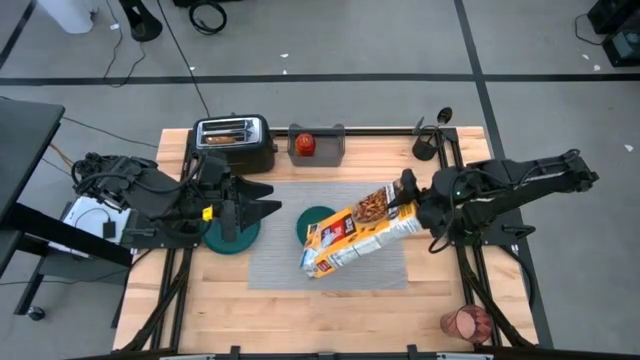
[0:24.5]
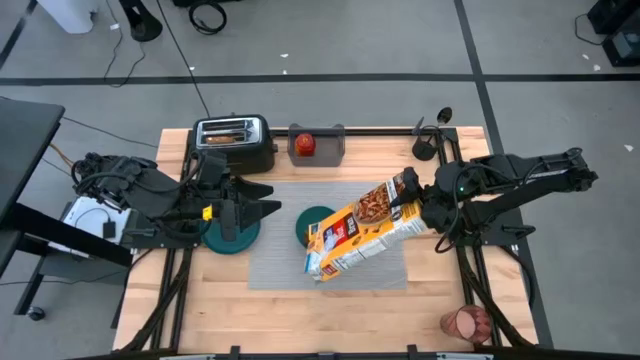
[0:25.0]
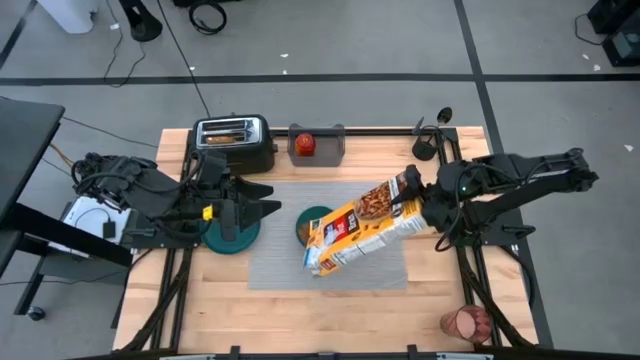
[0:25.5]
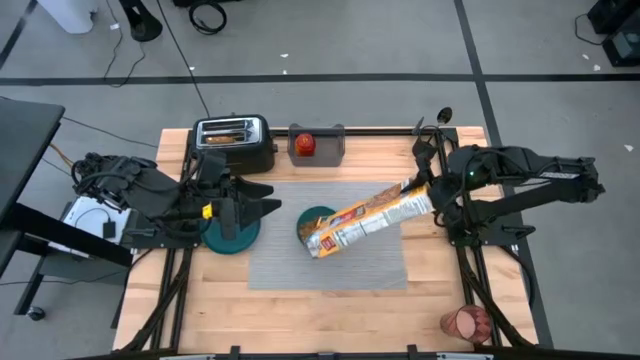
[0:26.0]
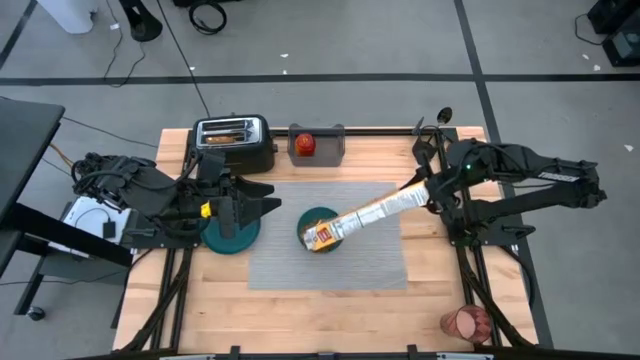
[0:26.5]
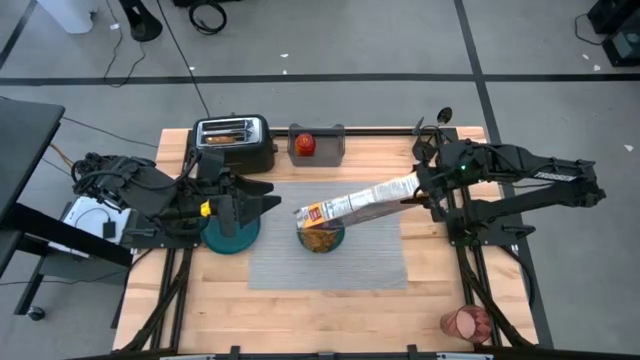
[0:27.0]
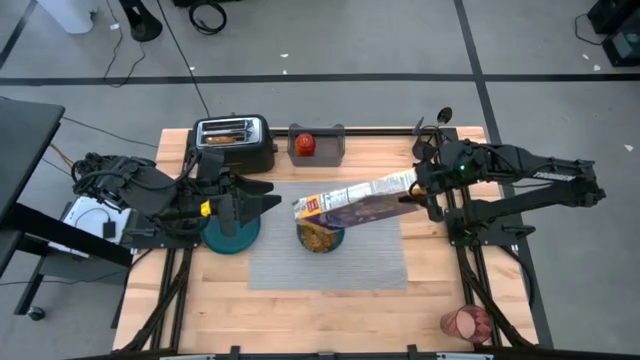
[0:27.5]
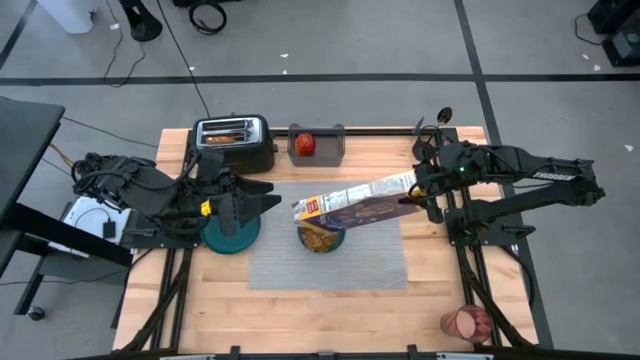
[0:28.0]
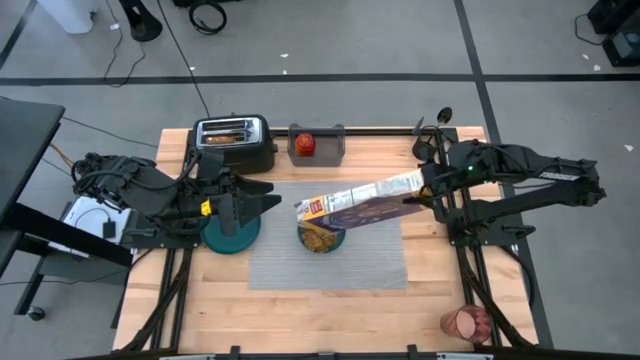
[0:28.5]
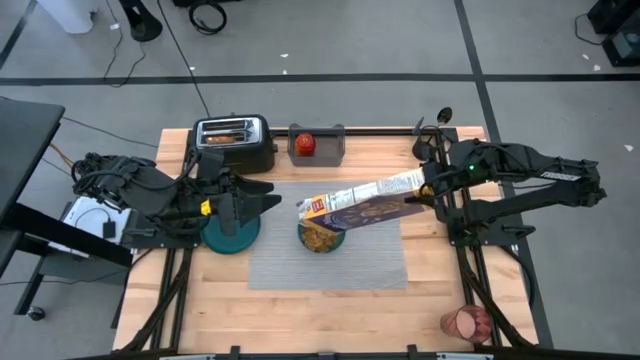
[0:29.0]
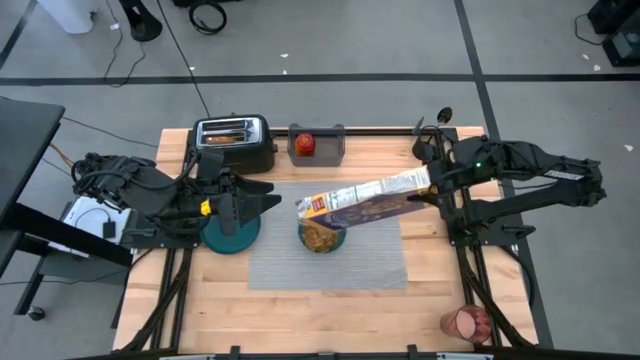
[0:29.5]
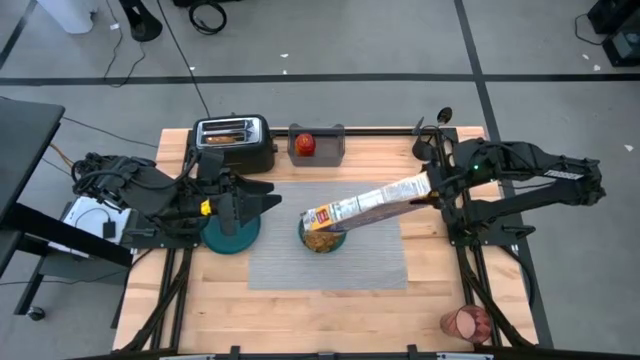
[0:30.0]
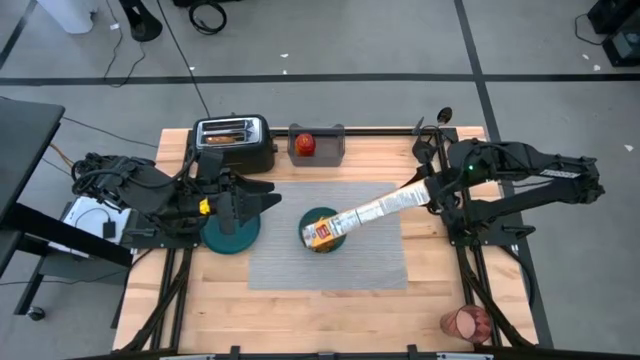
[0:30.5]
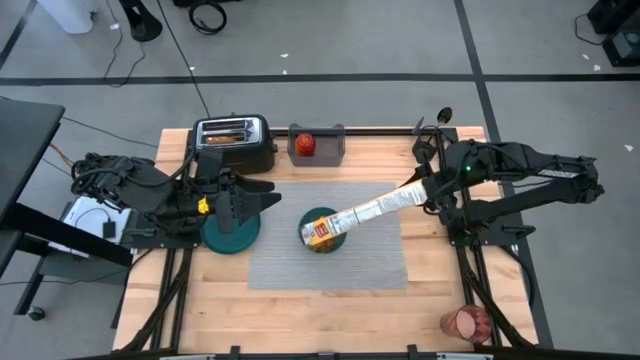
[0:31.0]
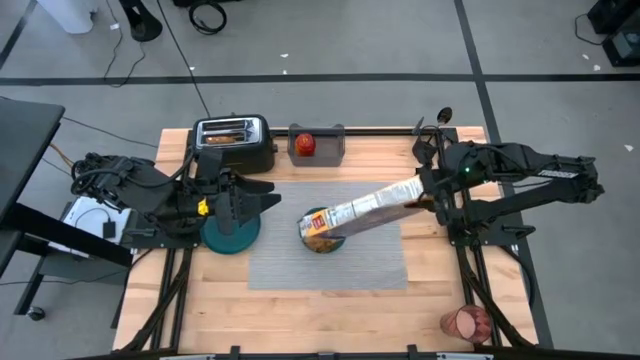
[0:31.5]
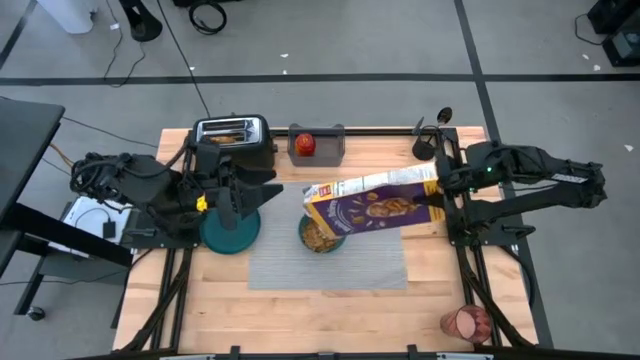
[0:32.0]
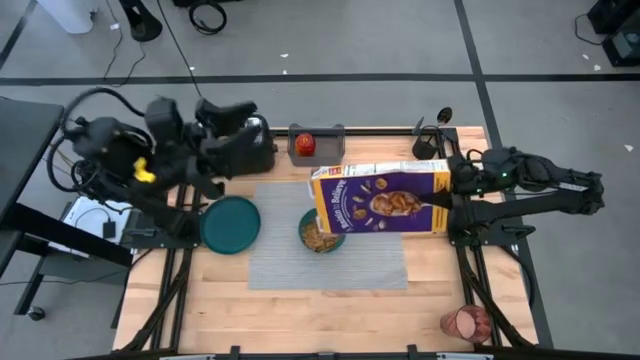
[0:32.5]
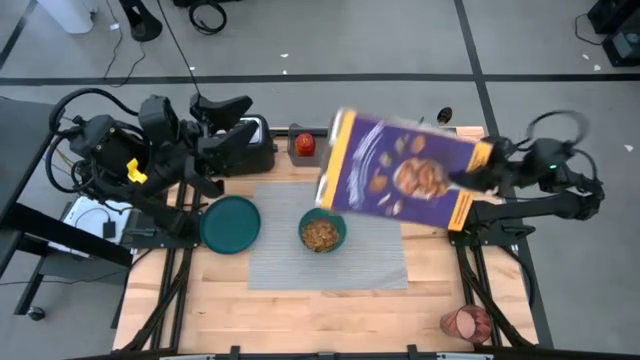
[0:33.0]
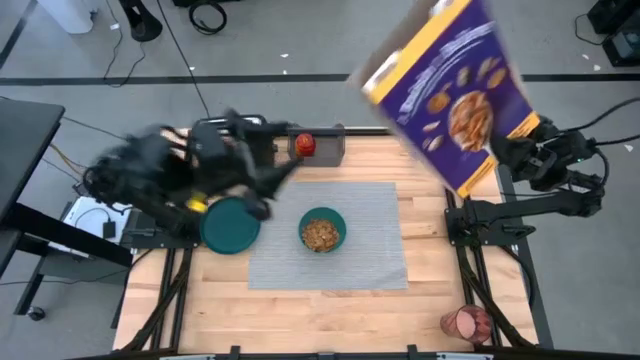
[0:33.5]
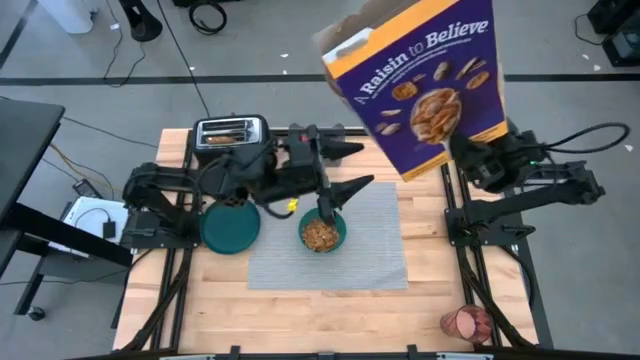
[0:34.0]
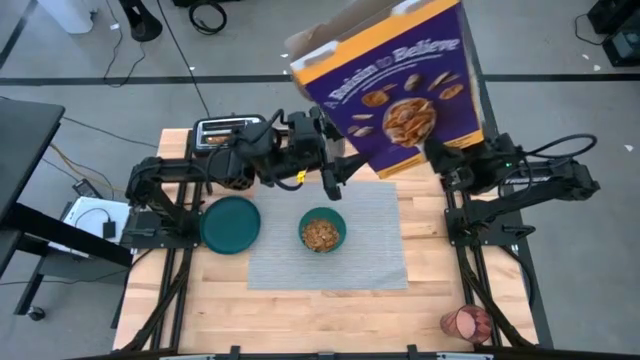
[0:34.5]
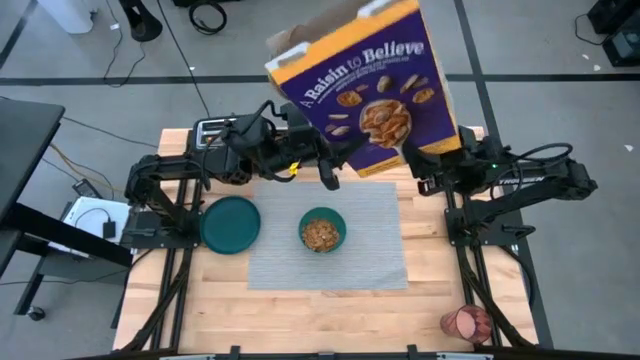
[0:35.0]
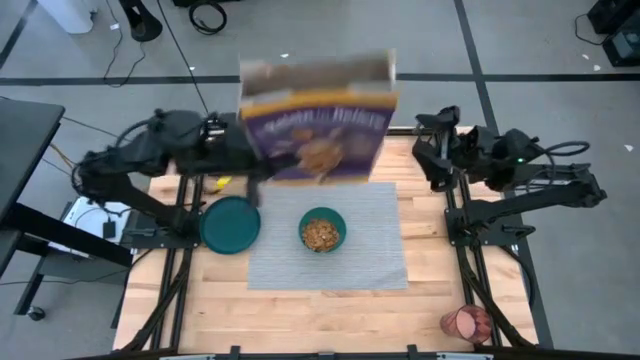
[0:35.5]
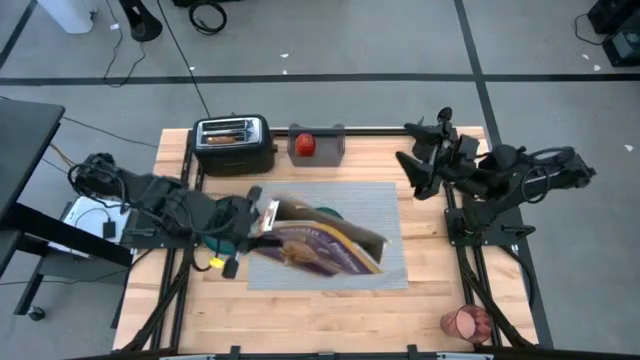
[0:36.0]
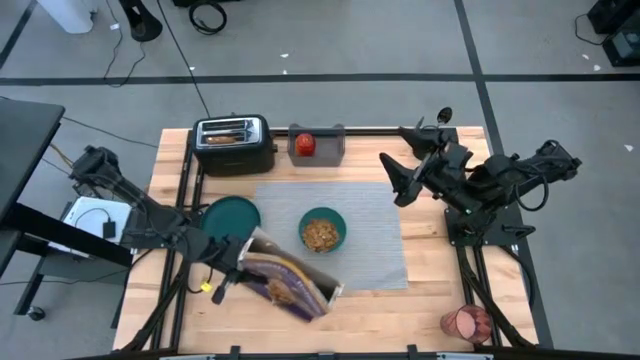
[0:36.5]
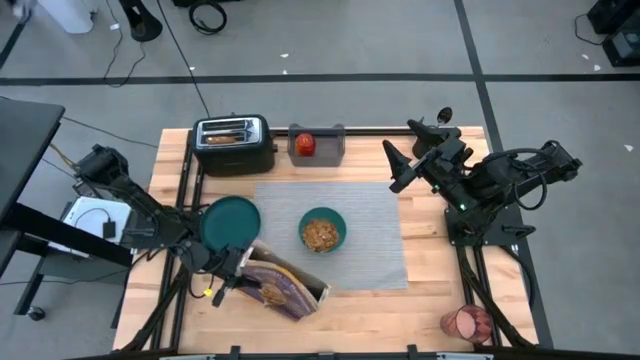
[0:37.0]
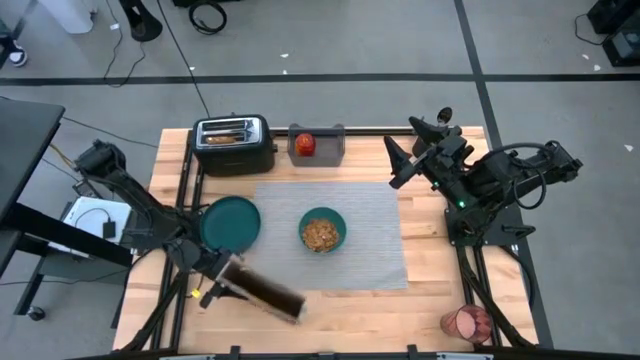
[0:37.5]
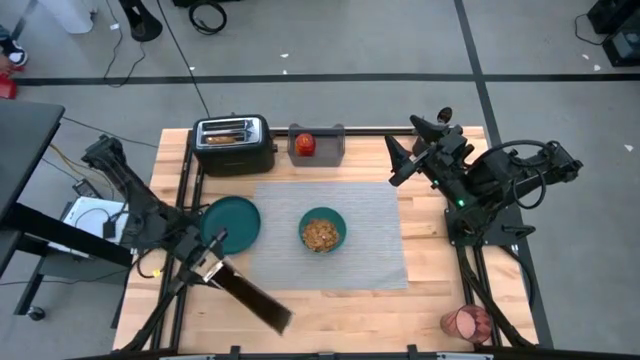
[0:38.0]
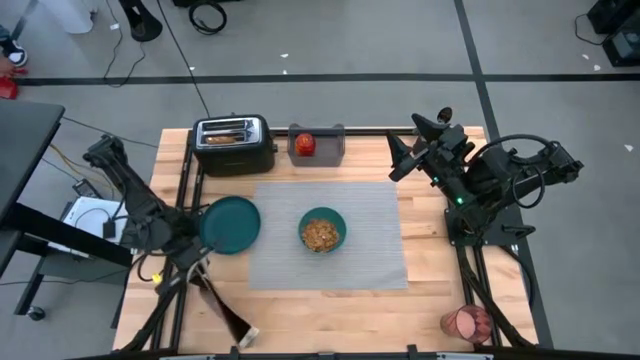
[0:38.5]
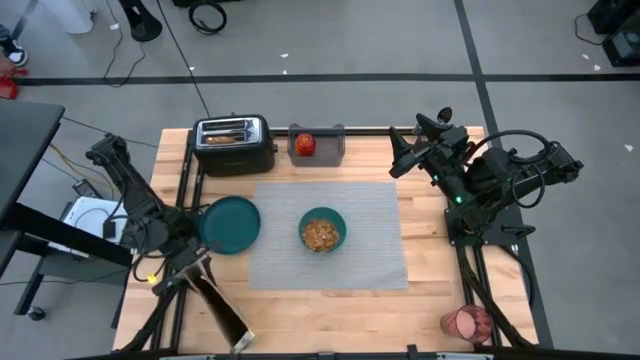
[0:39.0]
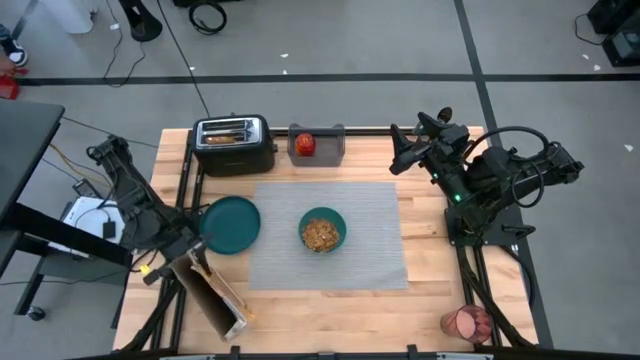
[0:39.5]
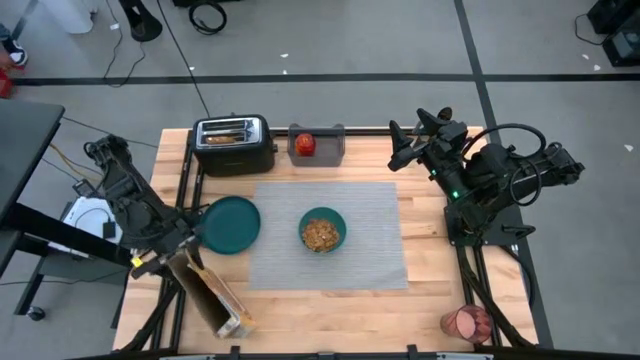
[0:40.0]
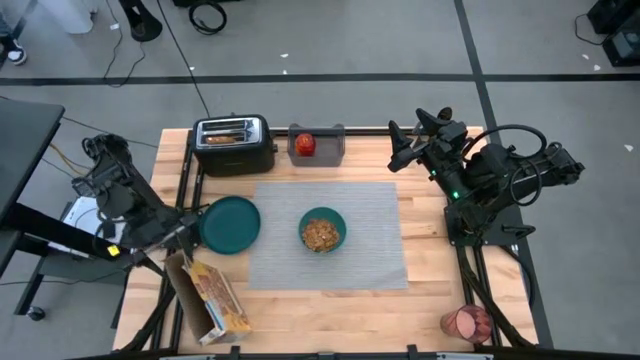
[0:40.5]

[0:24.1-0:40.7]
Task: Arrange a breakfast setting
Pour the cereal on the green bowl

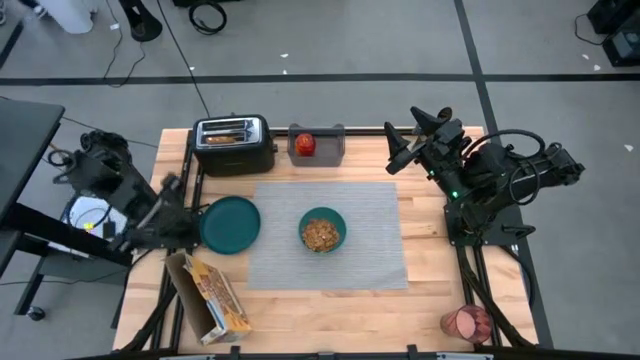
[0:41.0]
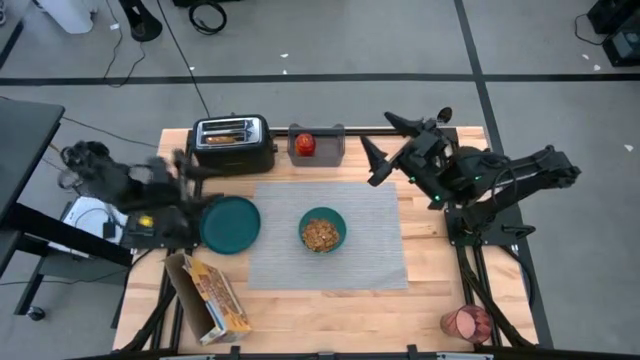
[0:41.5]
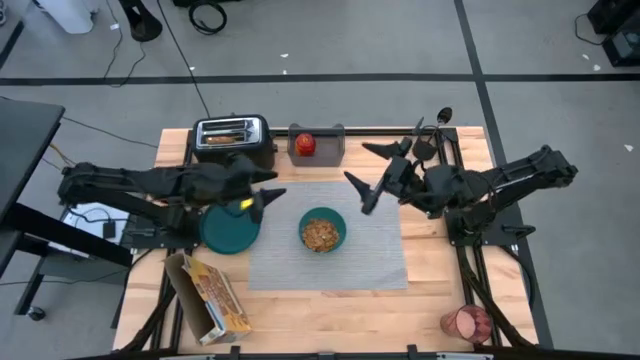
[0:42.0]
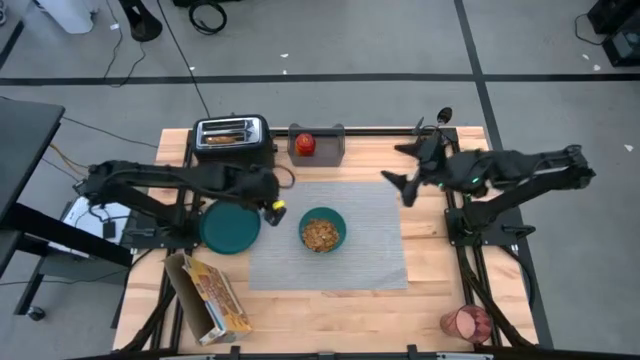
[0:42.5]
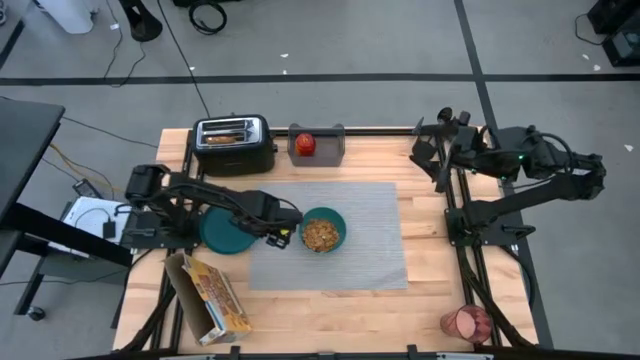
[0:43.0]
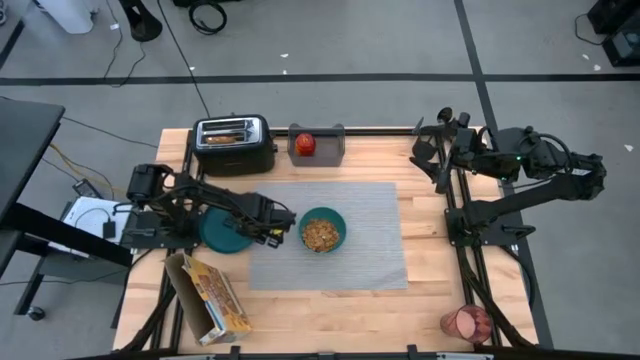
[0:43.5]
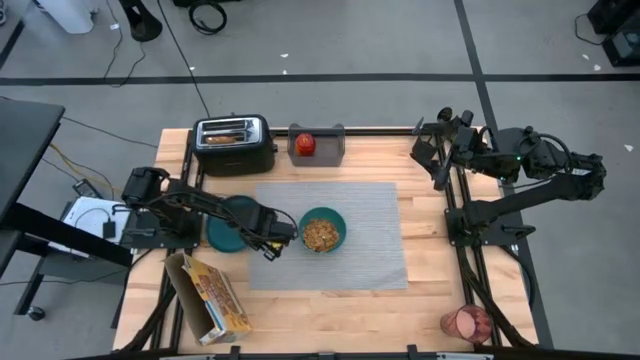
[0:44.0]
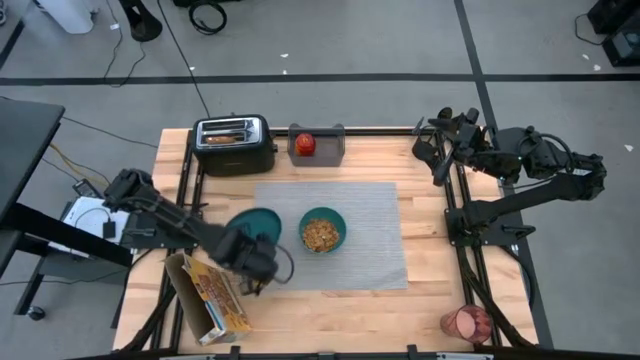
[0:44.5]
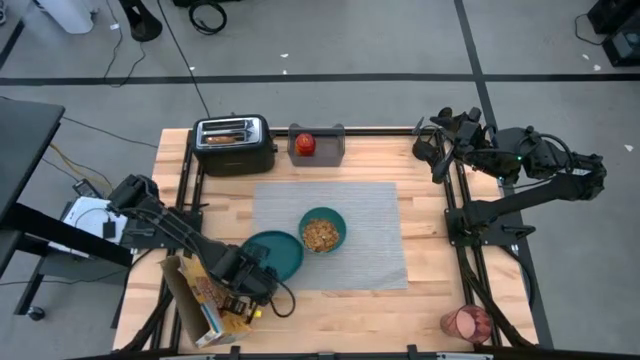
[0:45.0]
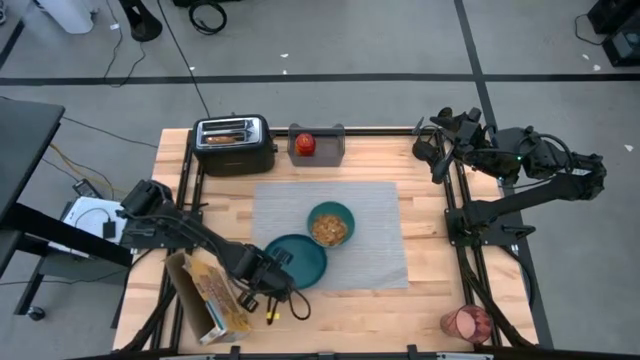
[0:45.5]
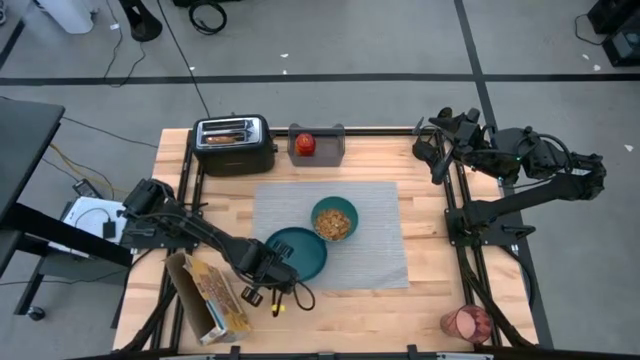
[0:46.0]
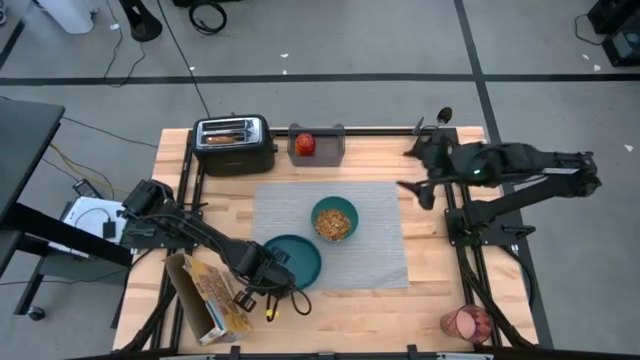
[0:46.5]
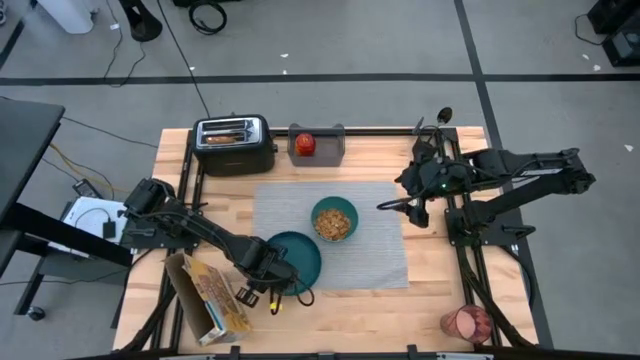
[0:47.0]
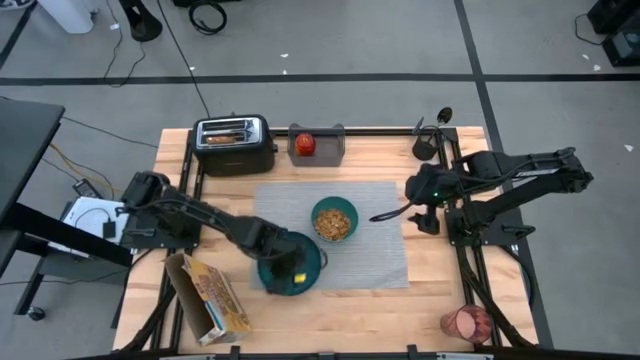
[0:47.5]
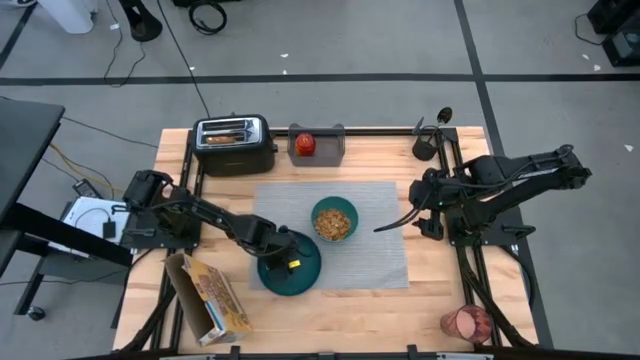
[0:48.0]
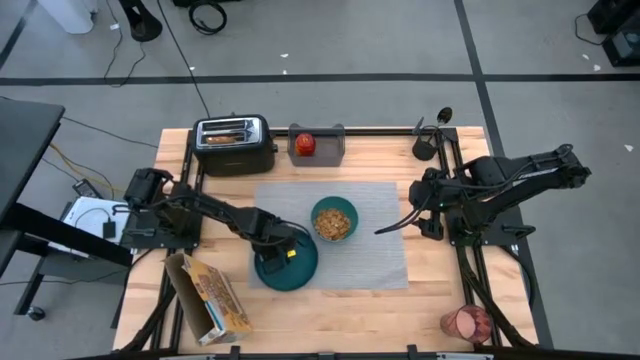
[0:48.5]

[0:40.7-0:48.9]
Put the blue plate on the bottom left of the placemat
